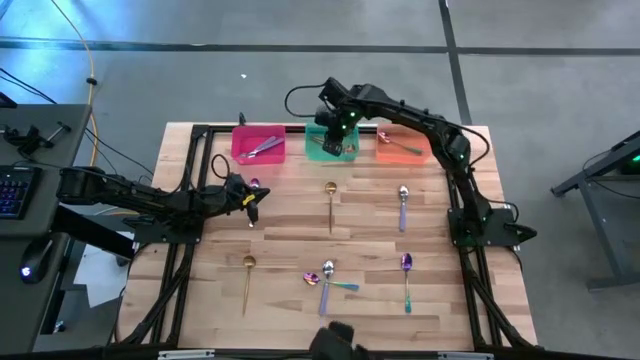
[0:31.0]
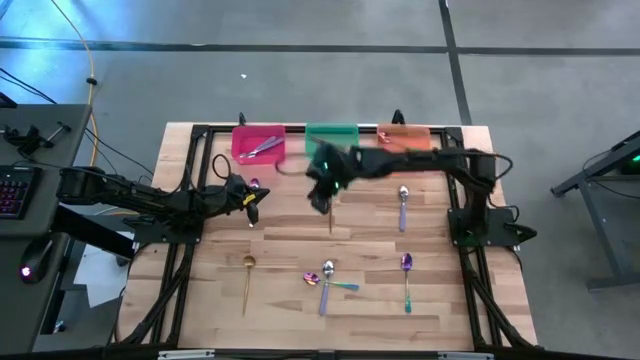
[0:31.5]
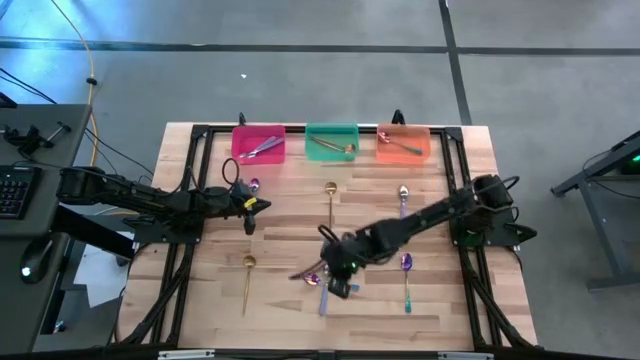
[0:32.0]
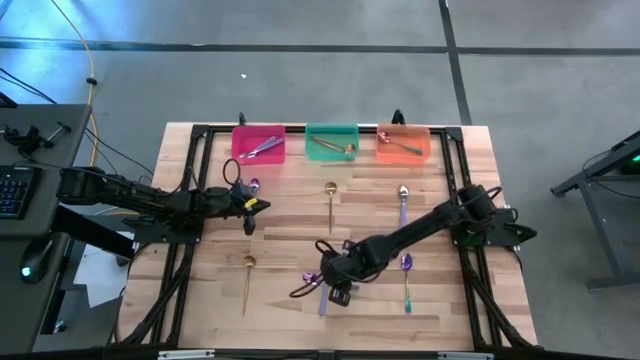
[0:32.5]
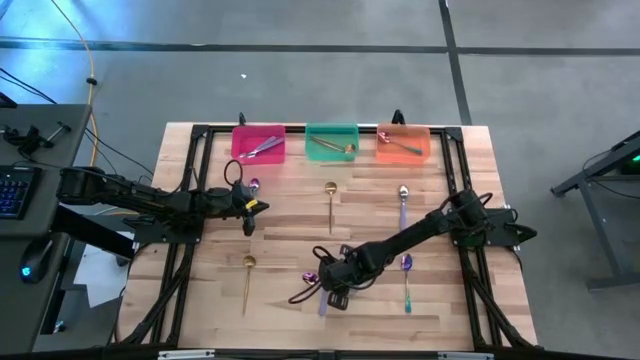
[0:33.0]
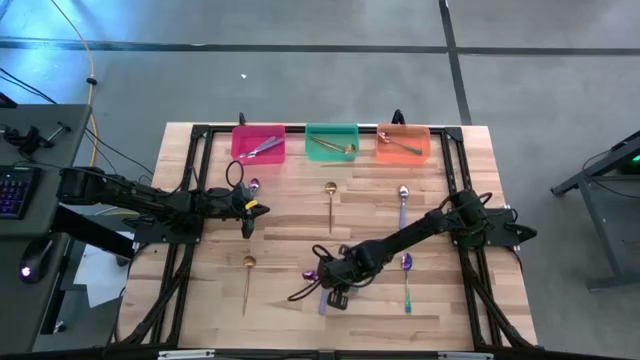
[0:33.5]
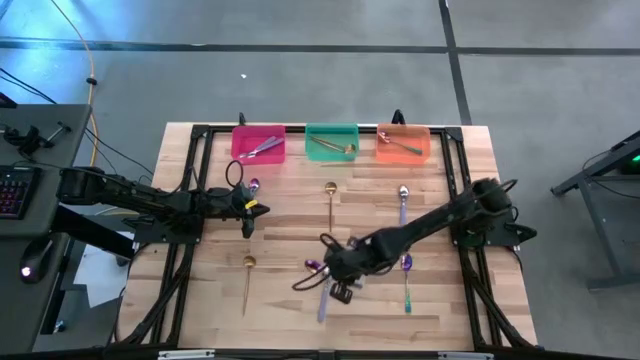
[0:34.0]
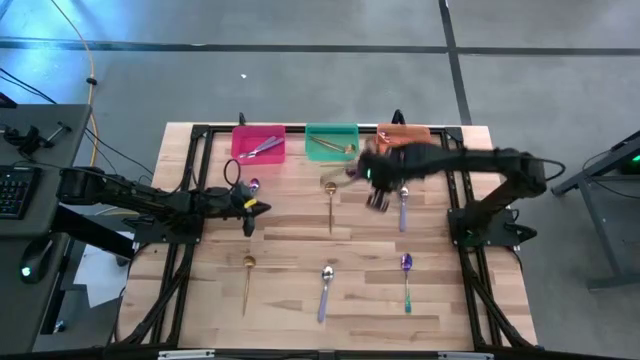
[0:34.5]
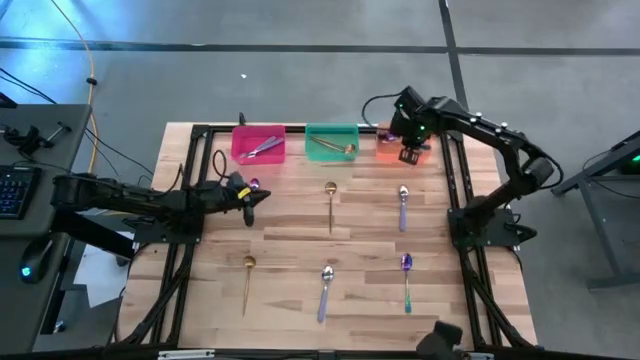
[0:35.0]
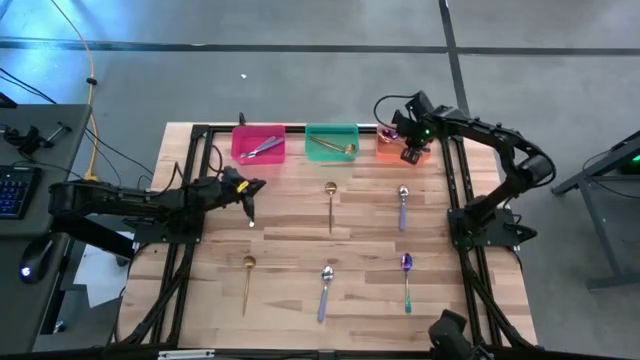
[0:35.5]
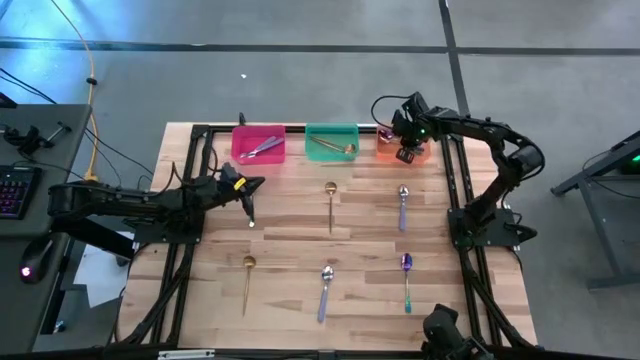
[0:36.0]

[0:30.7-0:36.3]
Task: Sort silverware by color (type)
Put the middle silver spoon into the orange bin

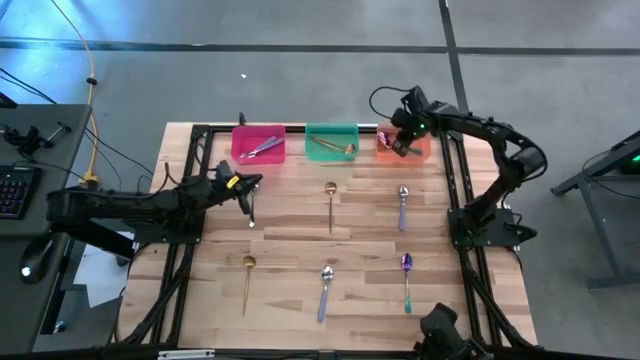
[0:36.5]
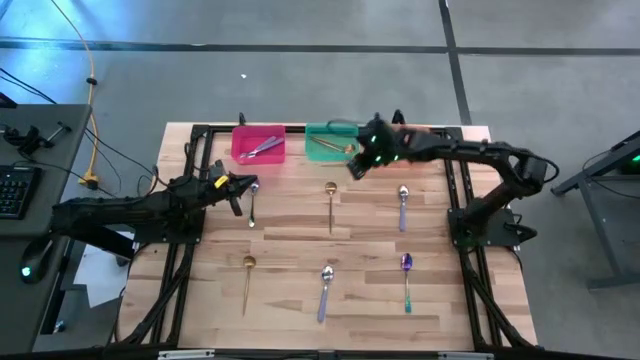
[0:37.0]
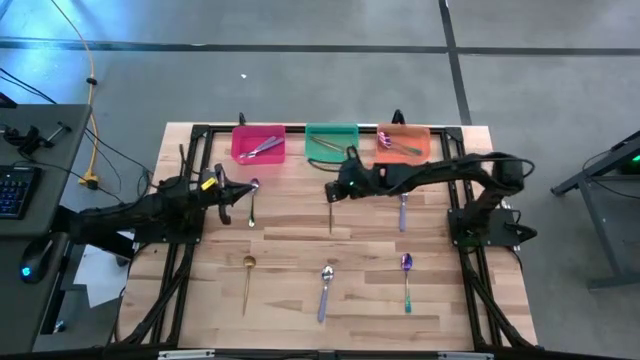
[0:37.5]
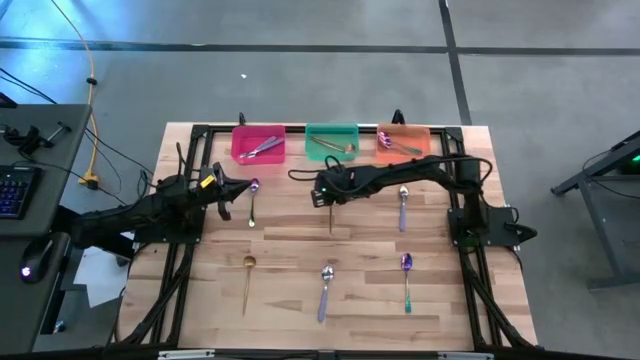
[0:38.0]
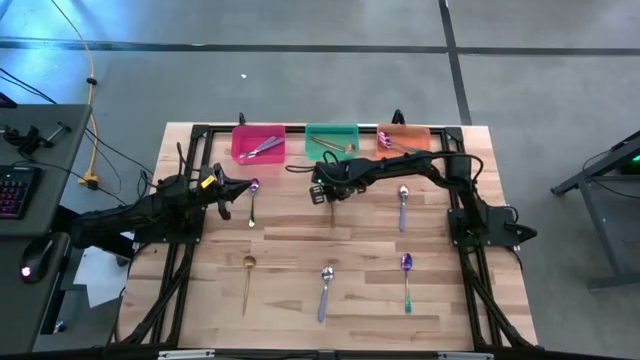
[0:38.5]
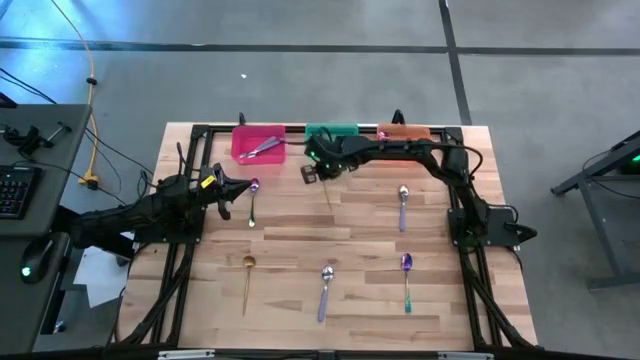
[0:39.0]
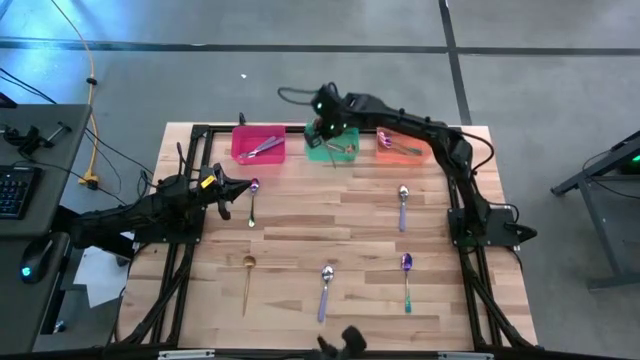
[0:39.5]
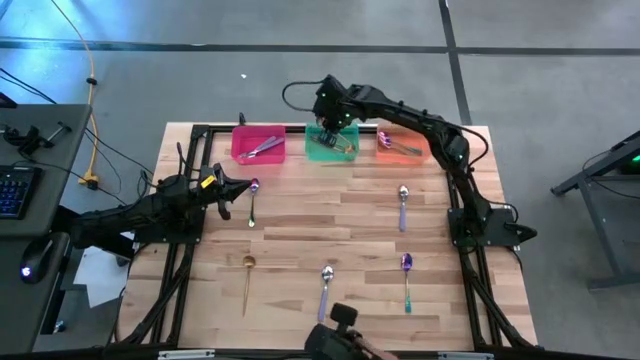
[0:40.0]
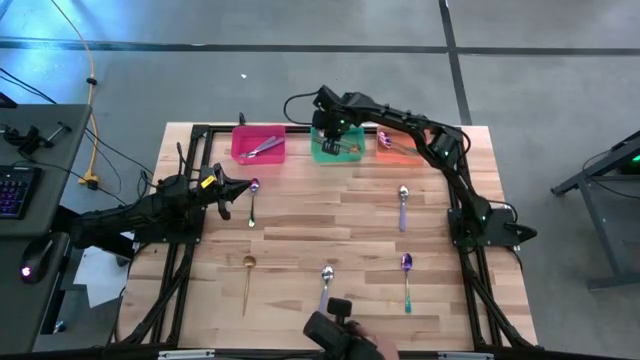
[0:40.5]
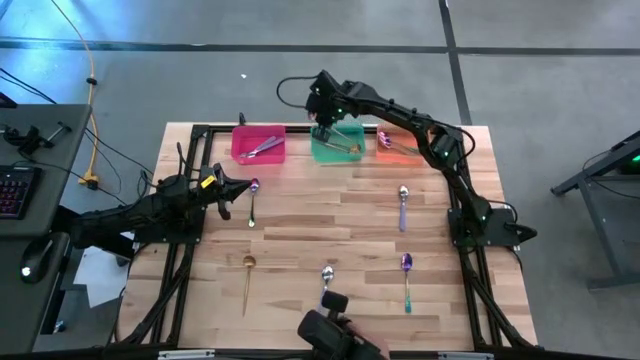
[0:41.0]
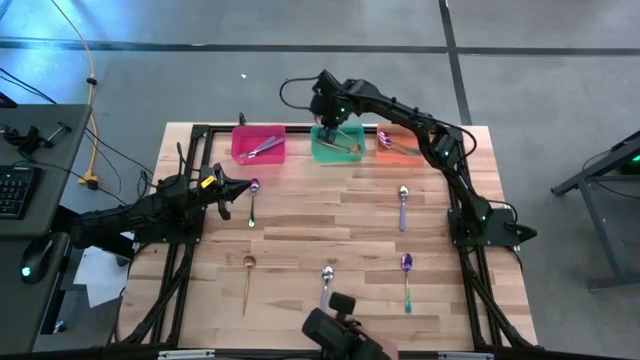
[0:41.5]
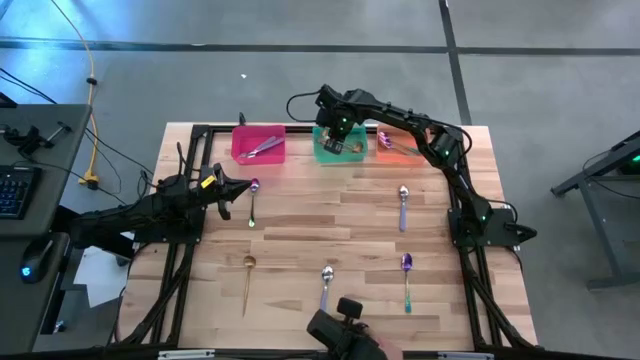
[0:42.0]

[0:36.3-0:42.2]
Put the top gold spoon into the green bin

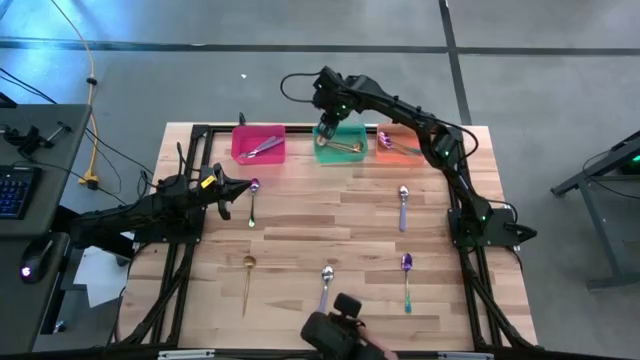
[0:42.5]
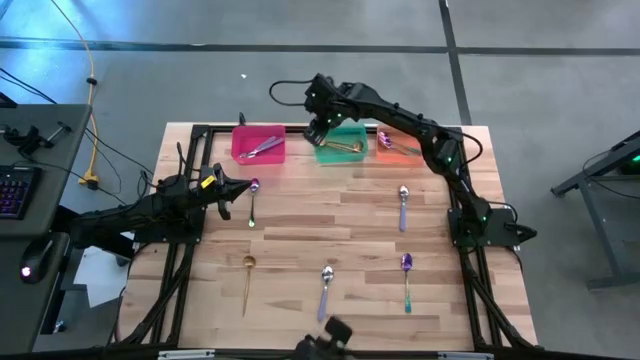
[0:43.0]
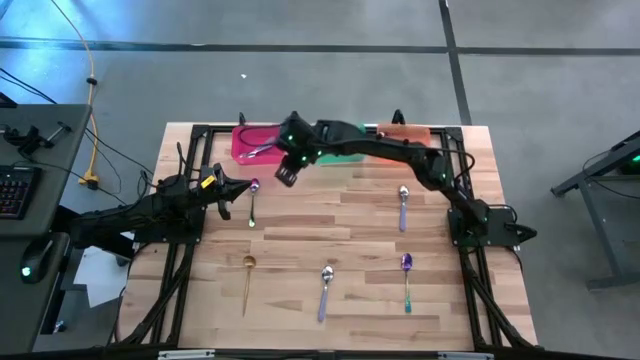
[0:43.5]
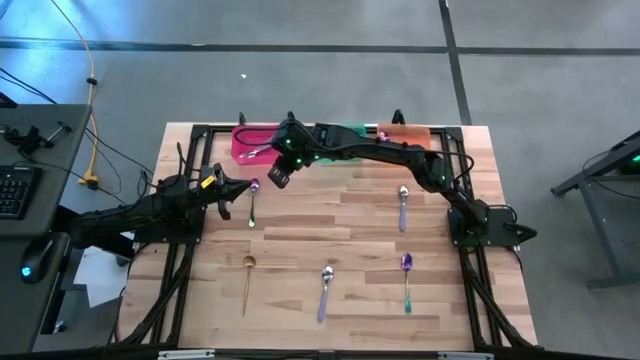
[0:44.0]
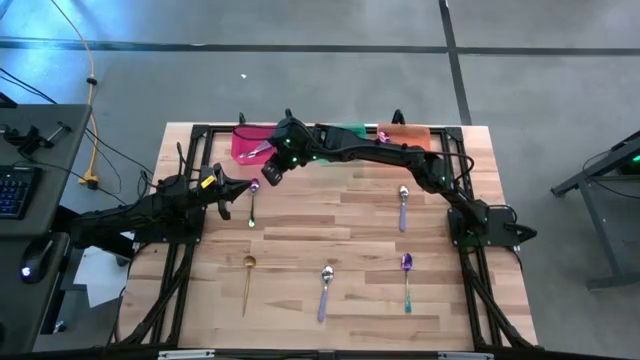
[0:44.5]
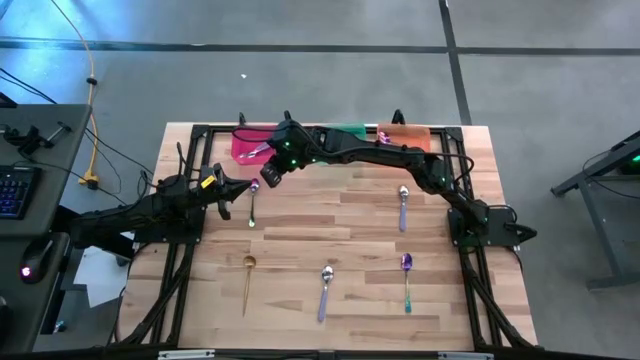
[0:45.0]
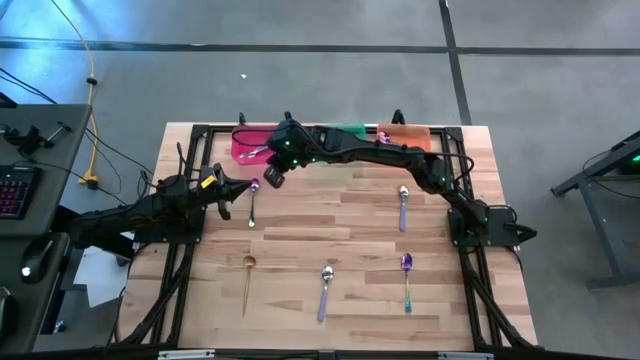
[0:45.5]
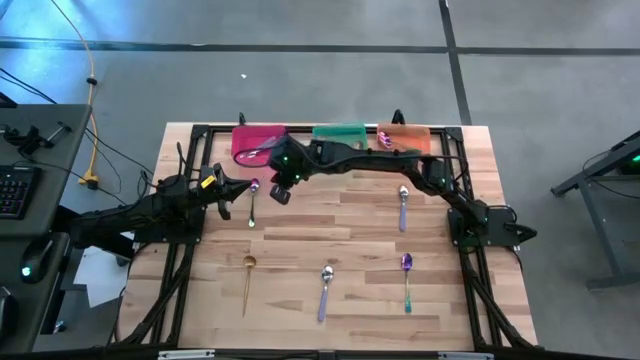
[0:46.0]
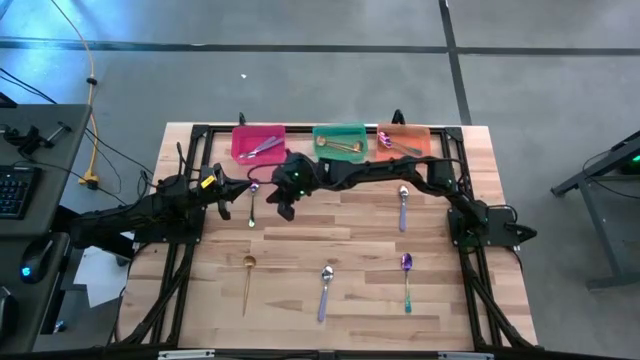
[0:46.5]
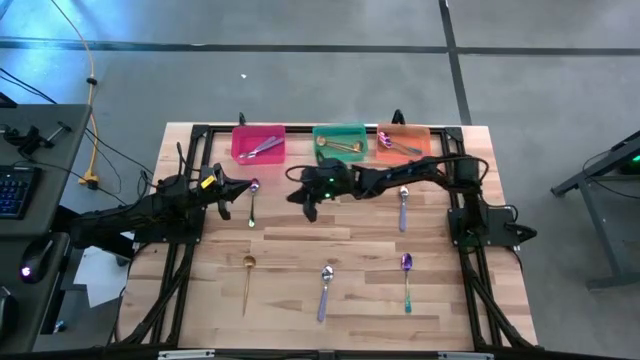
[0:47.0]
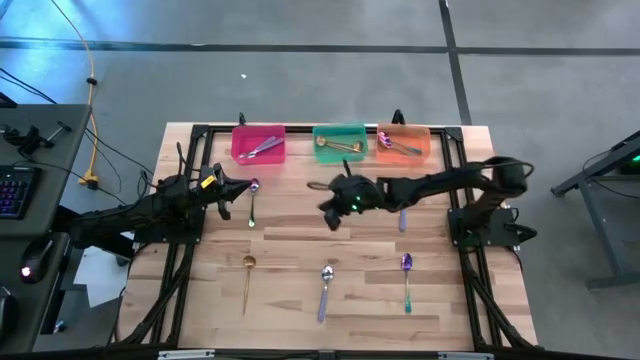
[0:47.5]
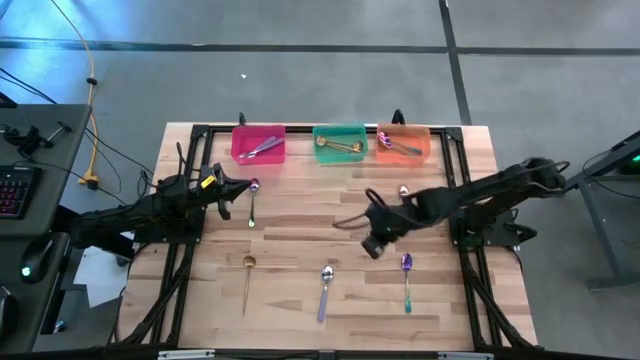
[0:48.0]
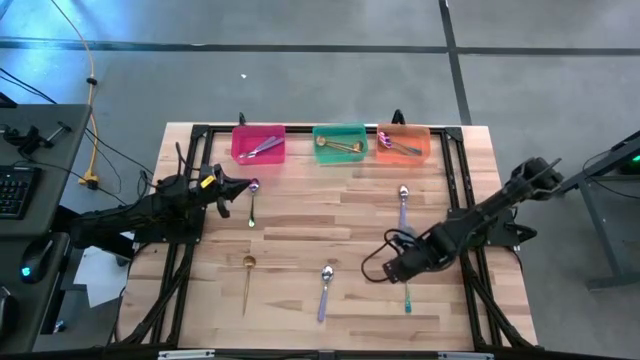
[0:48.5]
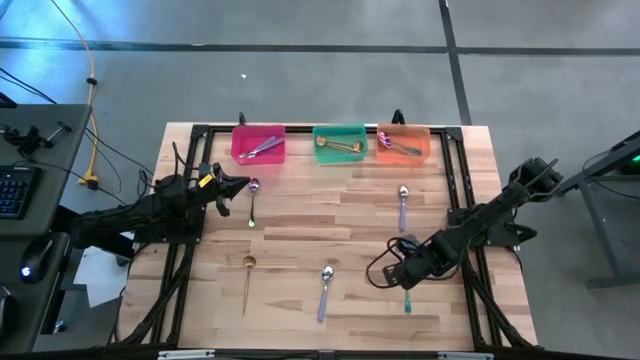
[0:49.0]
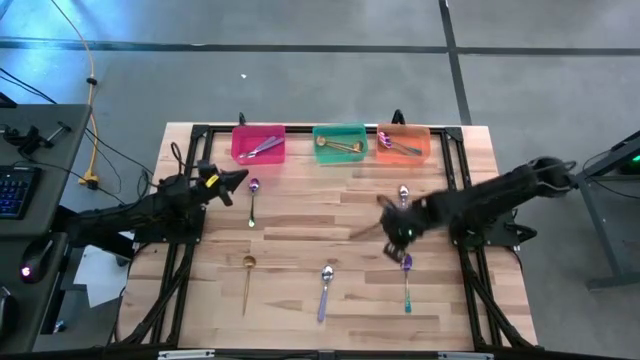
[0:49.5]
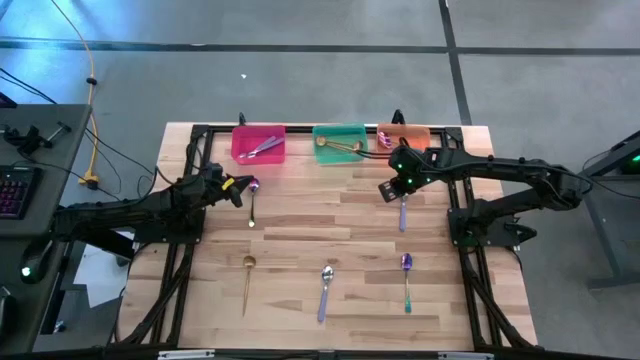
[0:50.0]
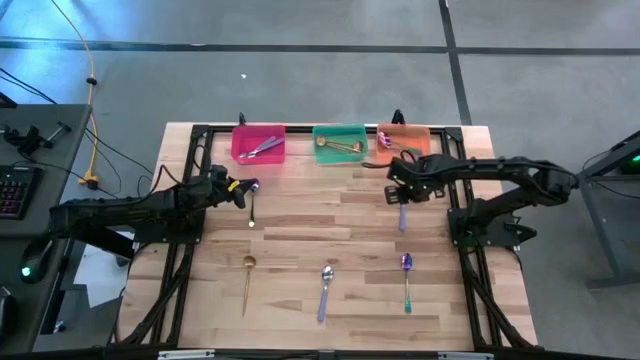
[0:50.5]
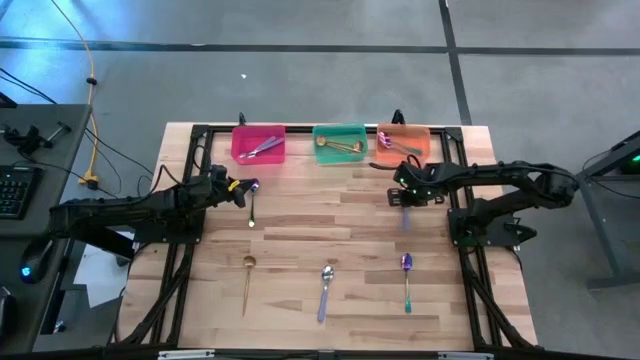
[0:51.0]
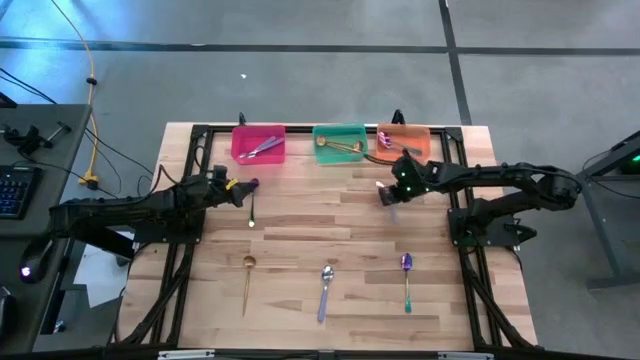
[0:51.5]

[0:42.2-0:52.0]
Put the top purple spoon into the pink bin
